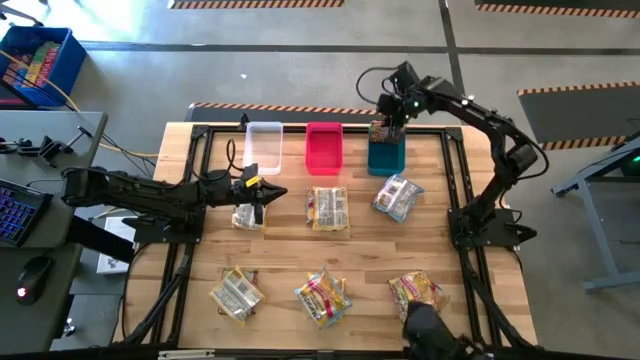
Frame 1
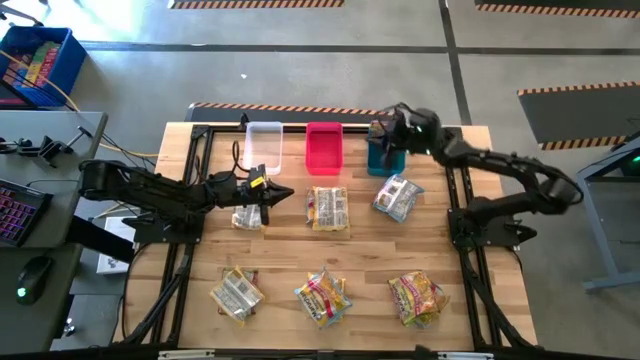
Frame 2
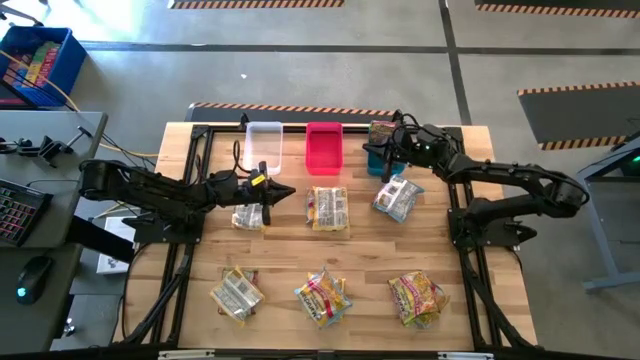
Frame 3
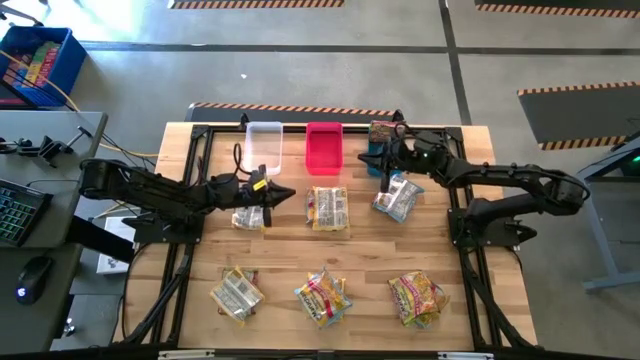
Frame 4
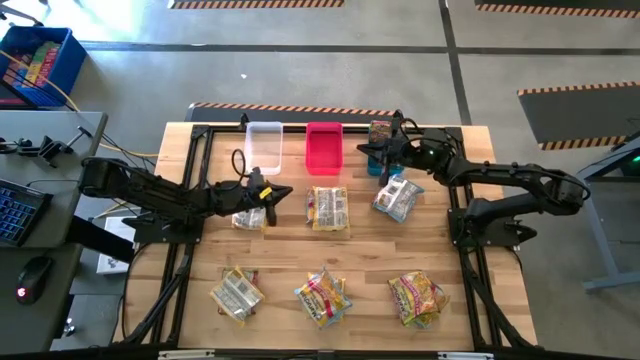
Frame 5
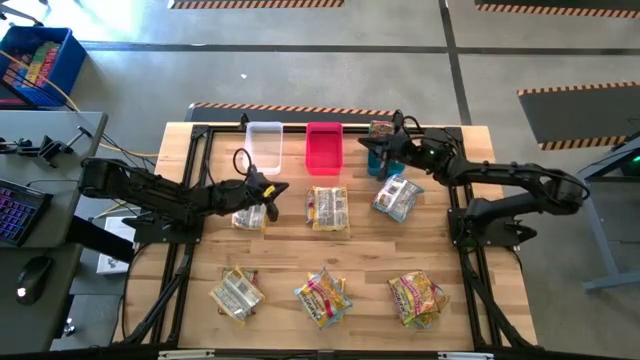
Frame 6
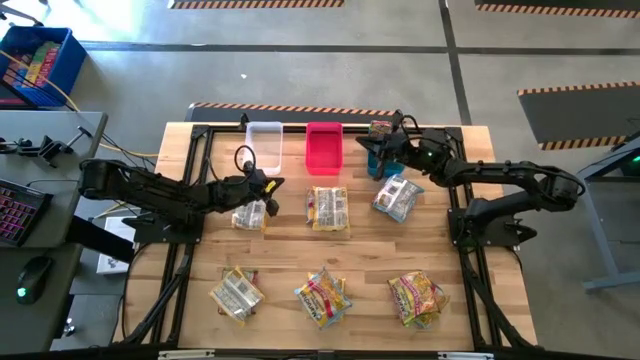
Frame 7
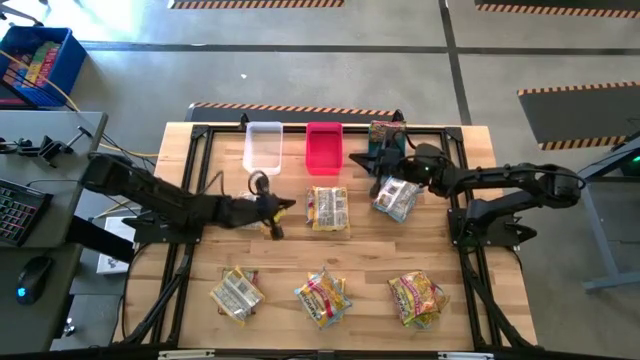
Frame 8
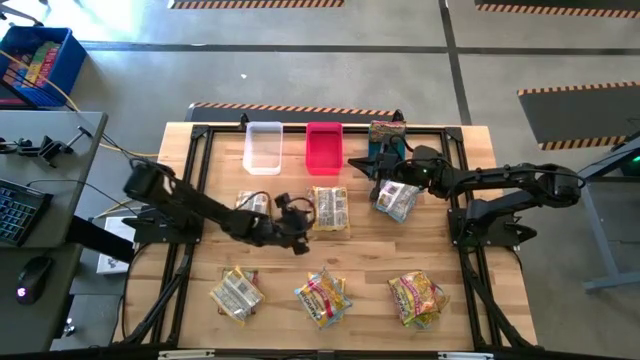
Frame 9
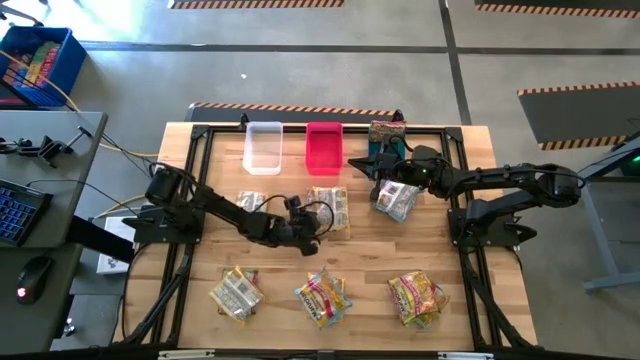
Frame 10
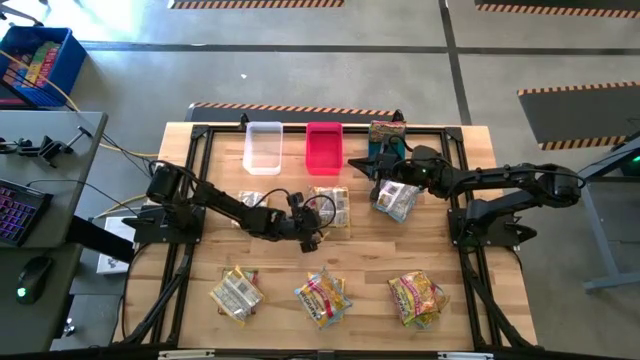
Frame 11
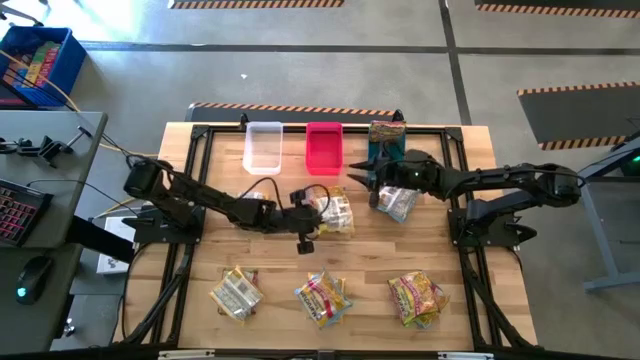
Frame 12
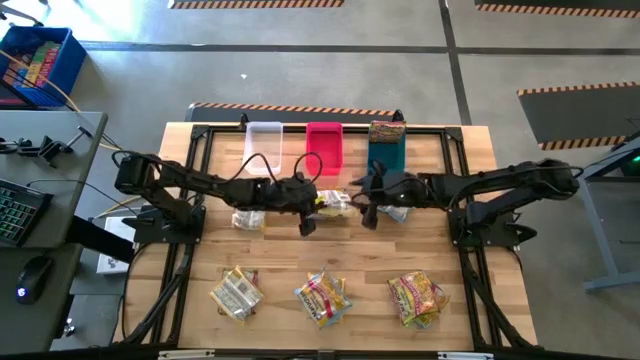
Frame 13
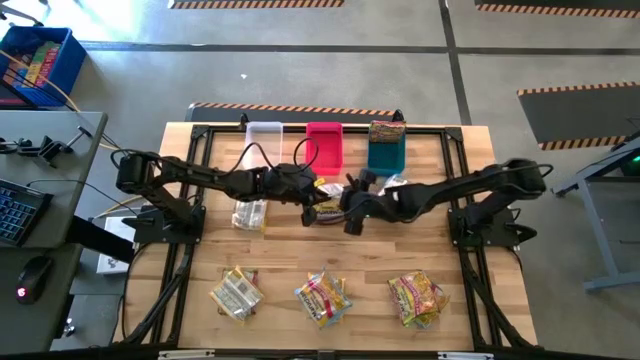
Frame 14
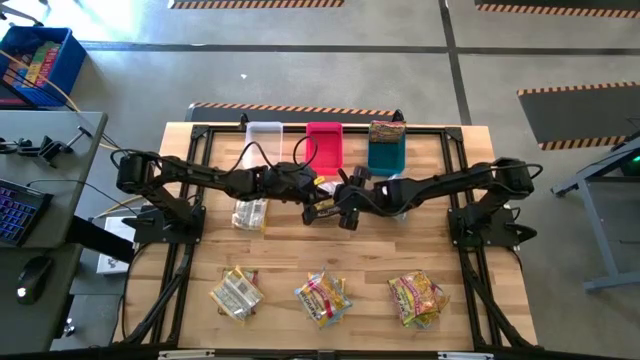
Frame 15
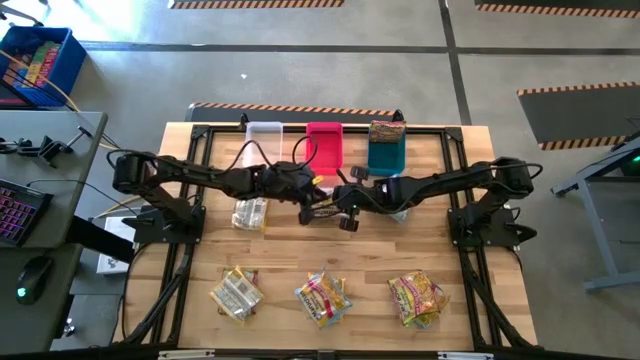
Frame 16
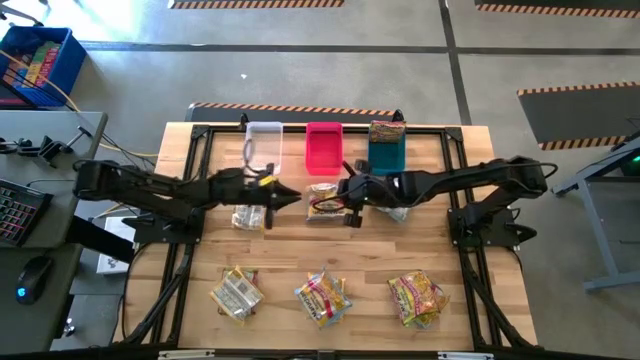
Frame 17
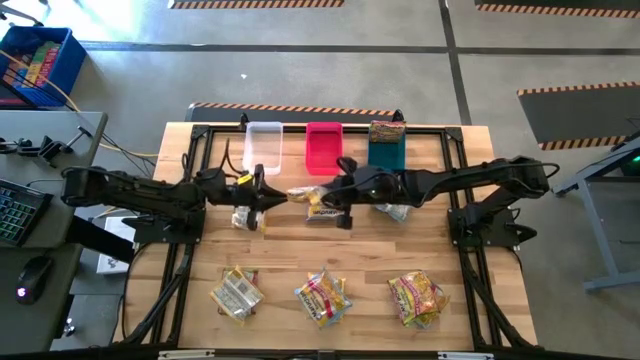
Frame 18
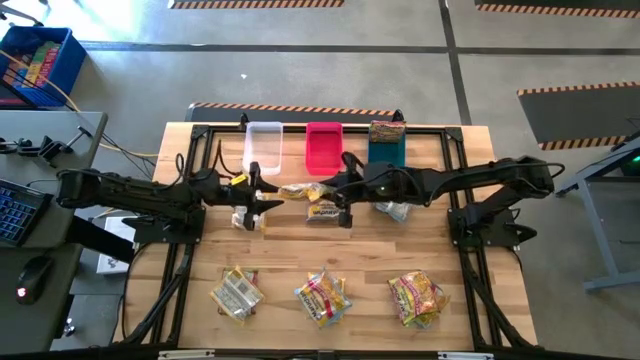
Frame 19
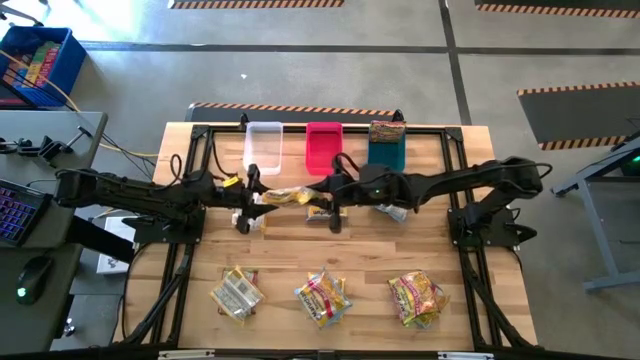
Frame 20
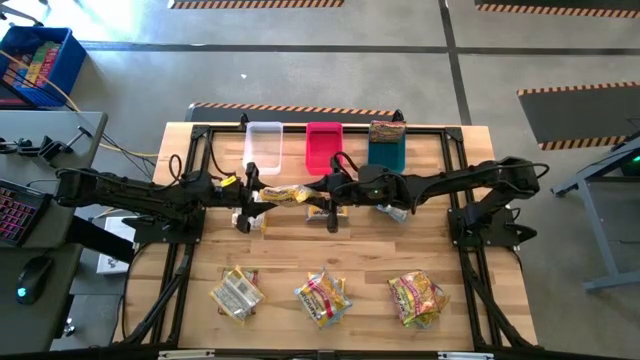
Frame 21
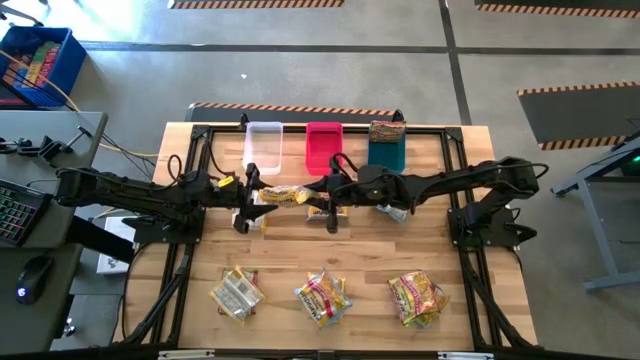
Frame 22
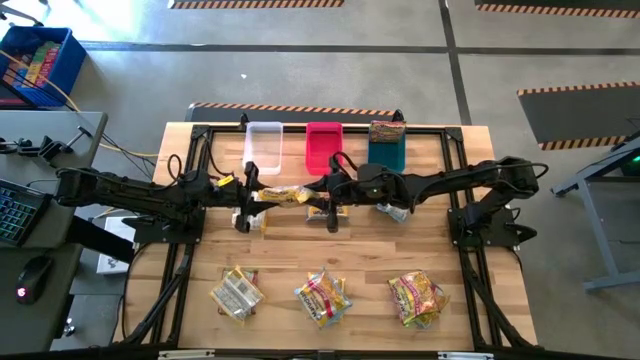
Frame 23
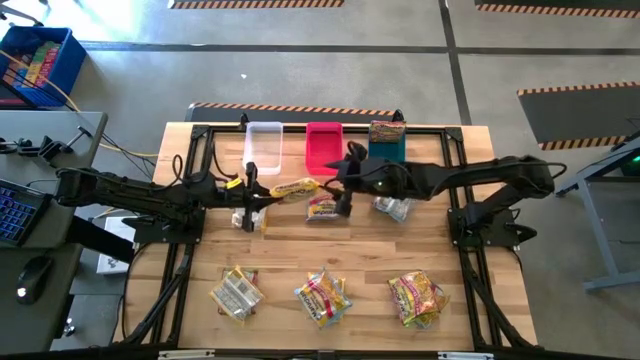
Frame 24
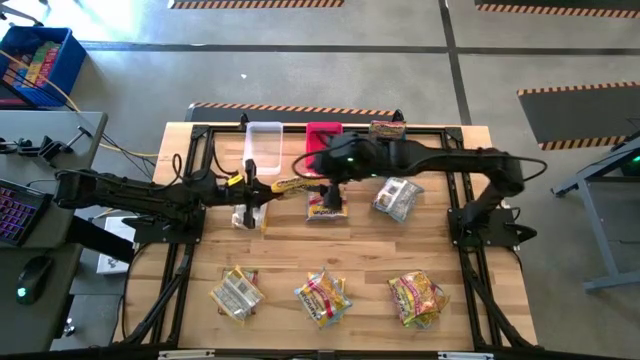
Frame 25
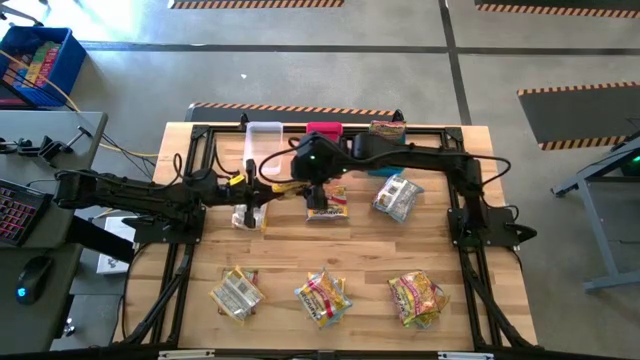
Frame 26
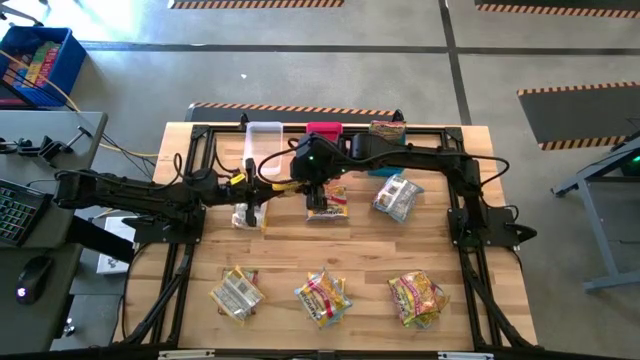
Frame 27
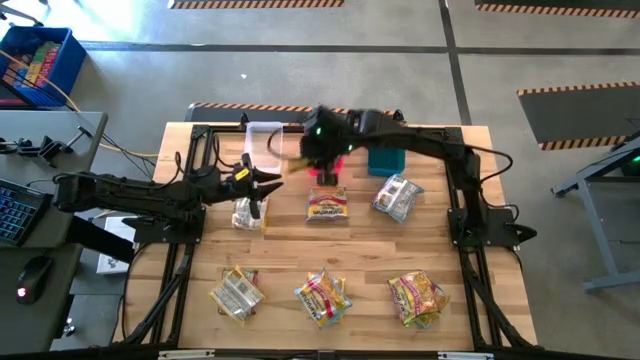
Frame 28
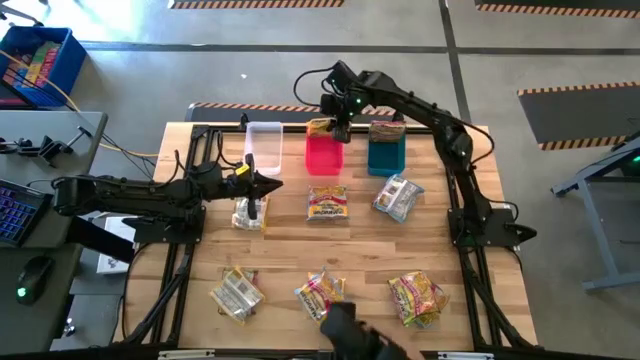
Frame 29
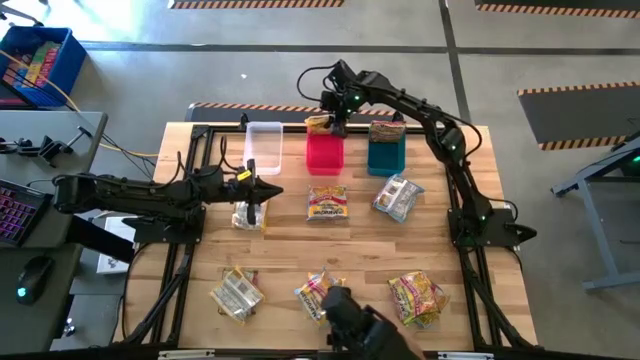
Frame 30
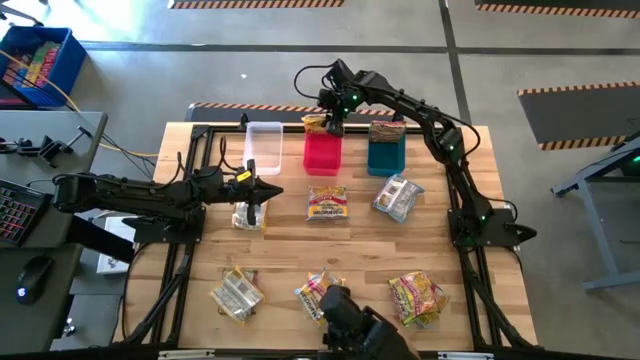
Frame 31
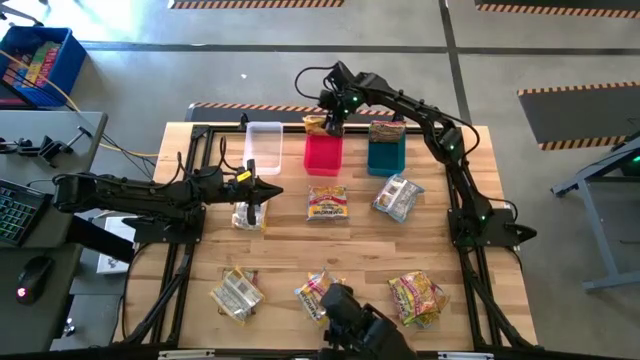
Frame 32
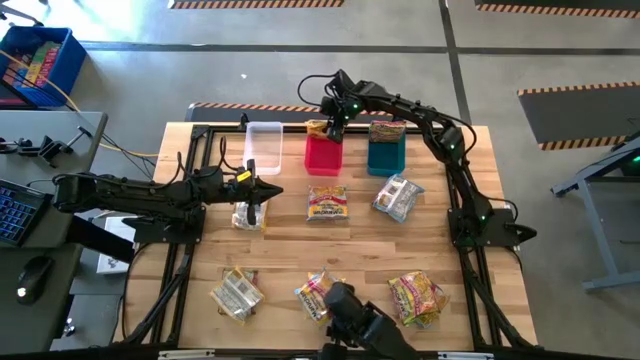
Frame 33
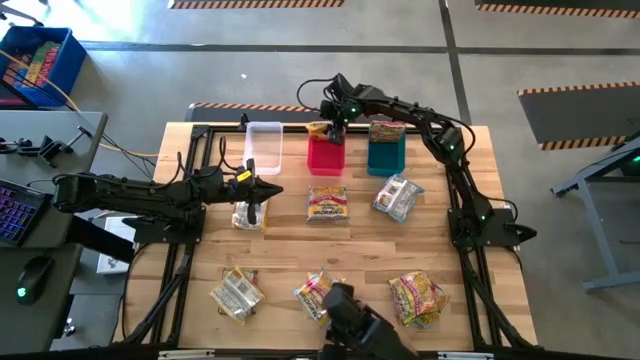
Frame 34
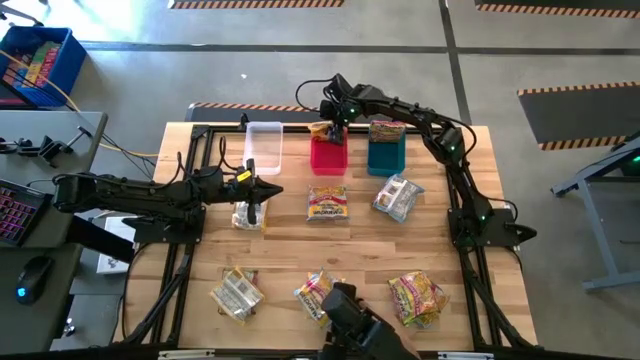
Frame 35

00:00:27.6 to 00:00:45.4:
Task: Sort Maruchan noodles
Put the yellow noodle pack into the red bin

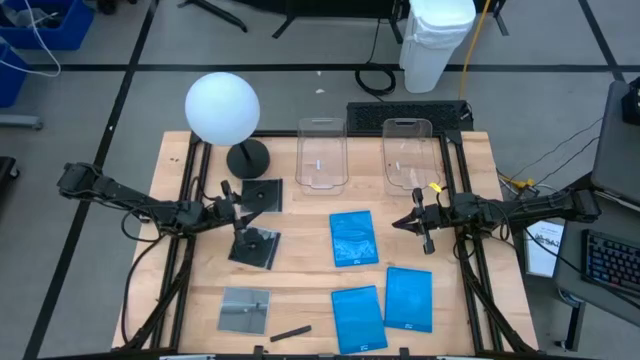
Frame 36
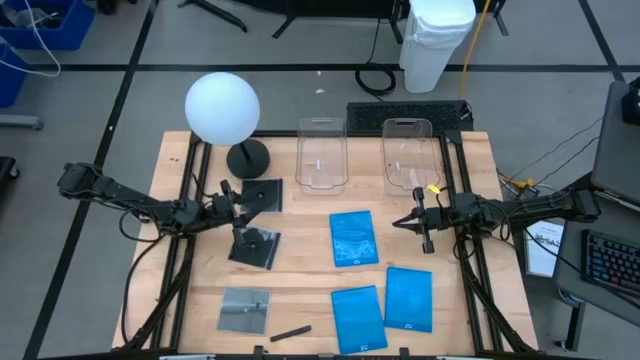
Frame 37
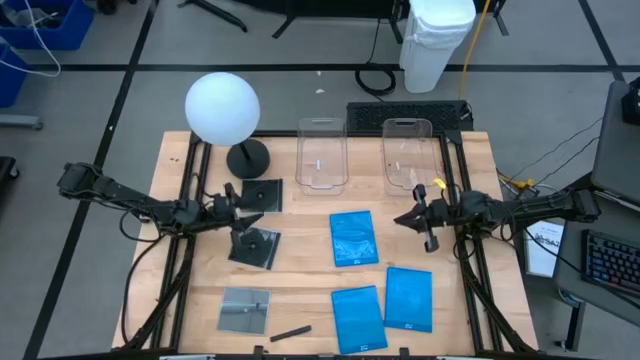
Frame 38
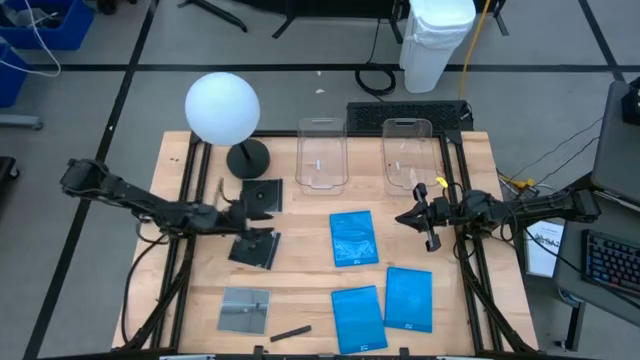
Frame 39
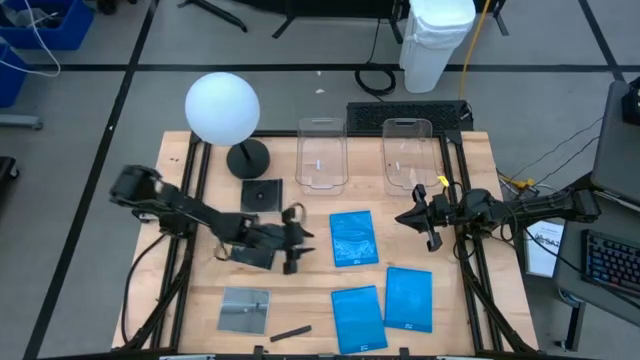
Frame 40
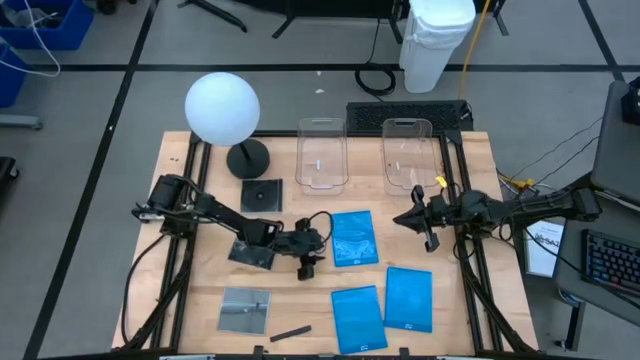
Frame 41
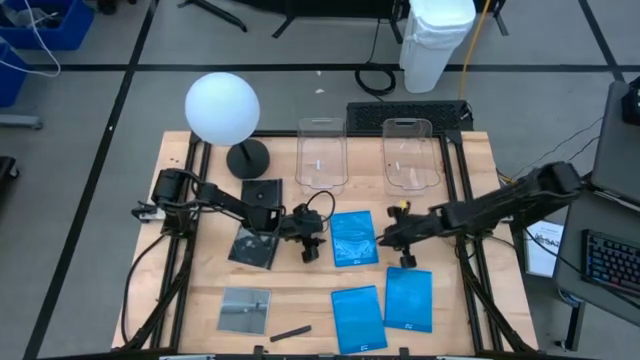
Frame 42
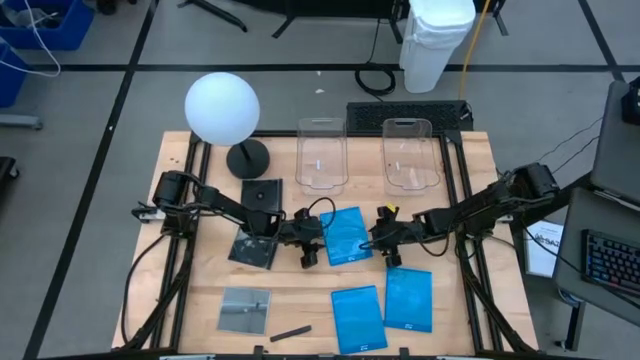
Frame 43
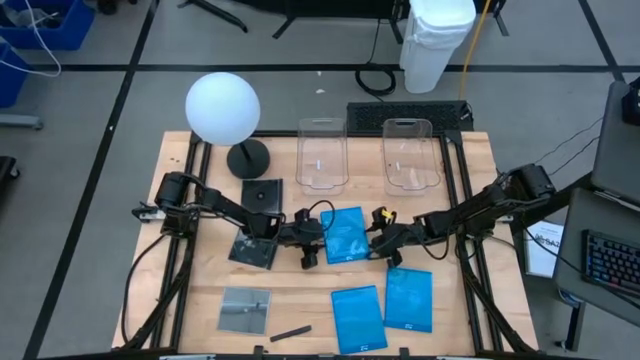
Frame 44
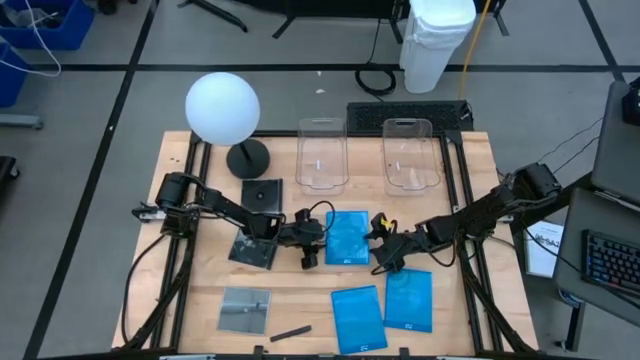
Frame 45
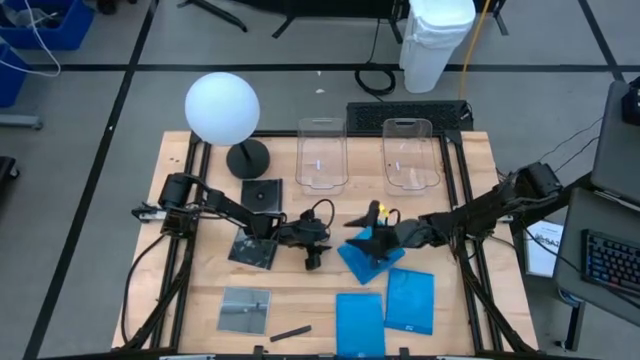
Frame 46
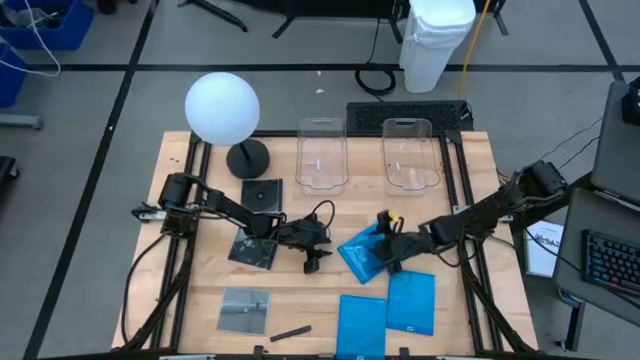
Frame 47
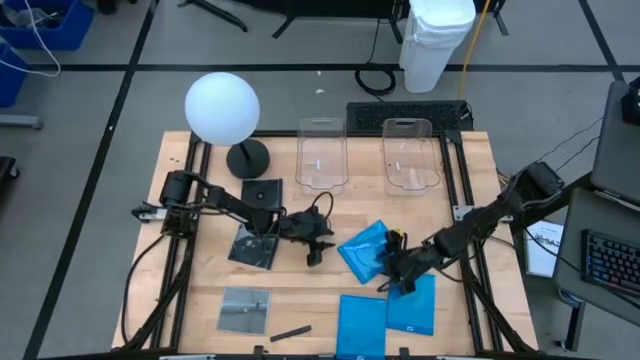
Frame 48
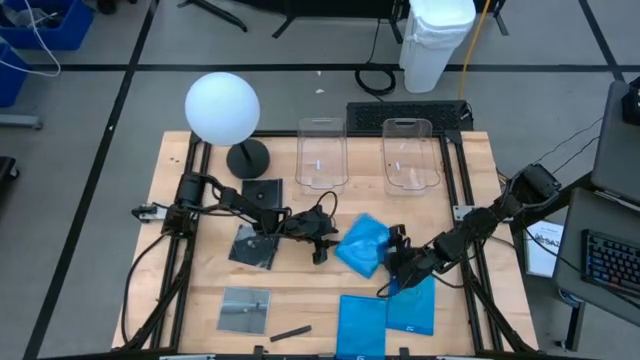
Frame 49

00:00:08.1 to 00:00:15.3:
Task: Pick & place jewel cases by type
Put the top left blue CD case into the right transparent bin
